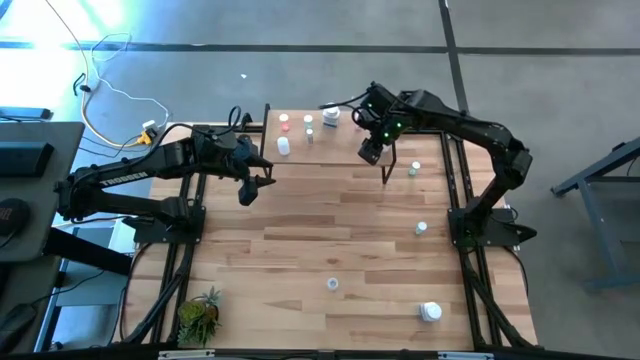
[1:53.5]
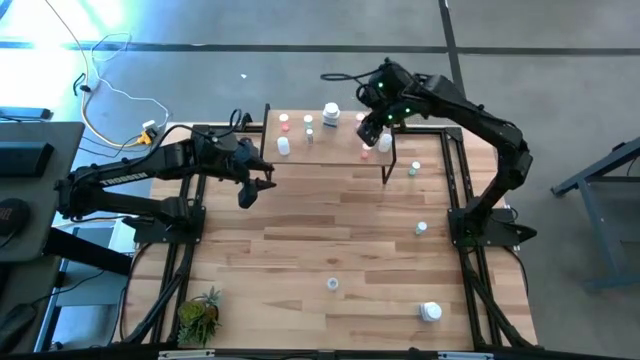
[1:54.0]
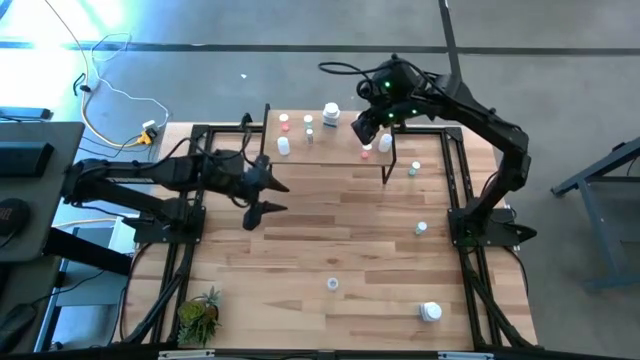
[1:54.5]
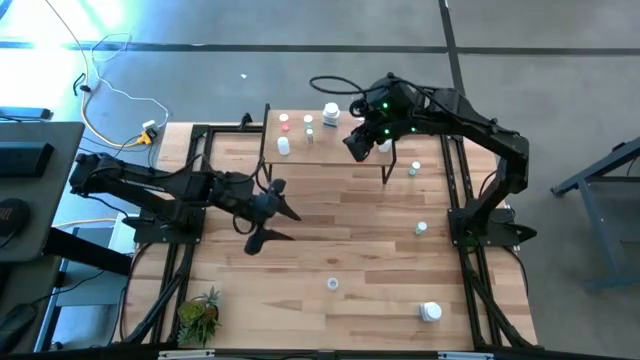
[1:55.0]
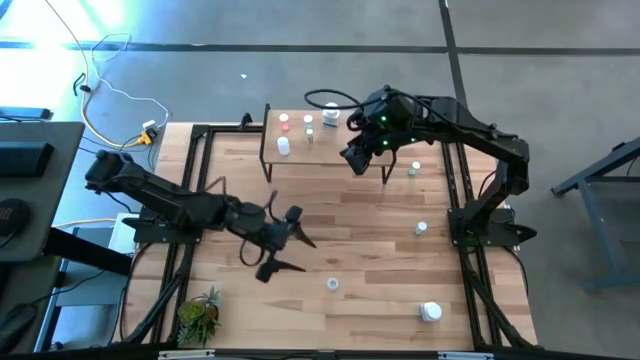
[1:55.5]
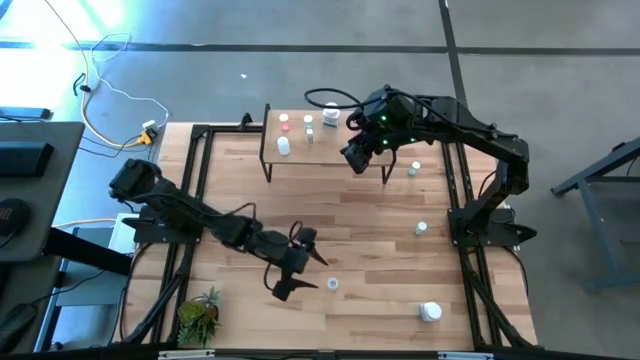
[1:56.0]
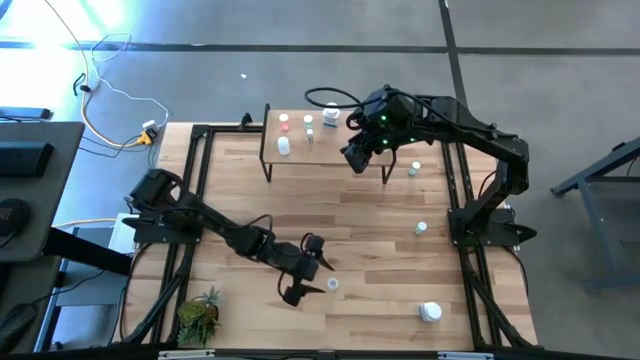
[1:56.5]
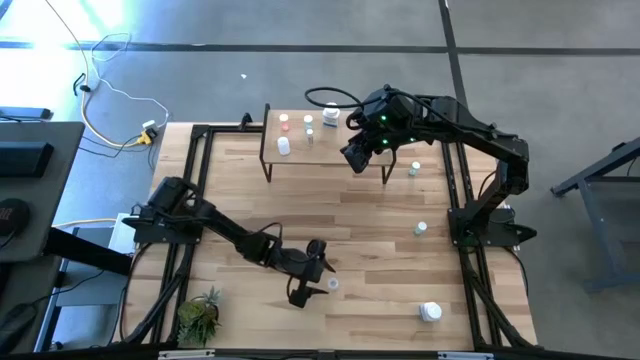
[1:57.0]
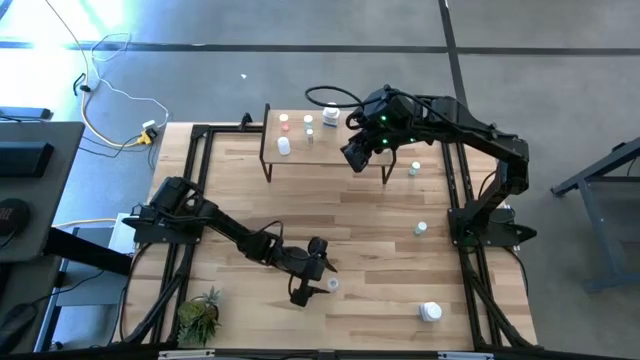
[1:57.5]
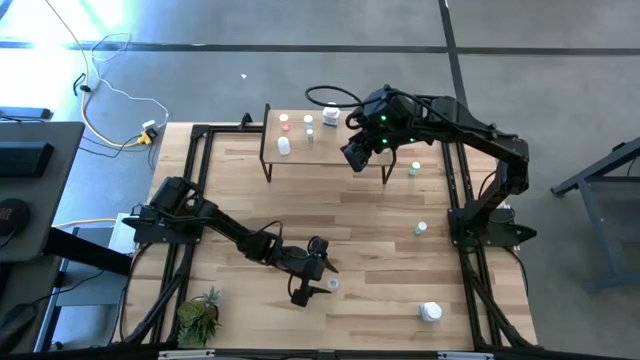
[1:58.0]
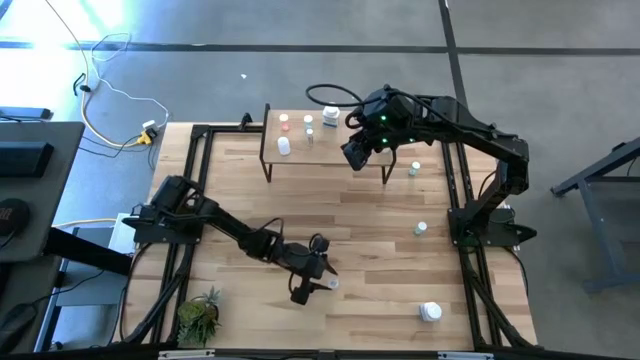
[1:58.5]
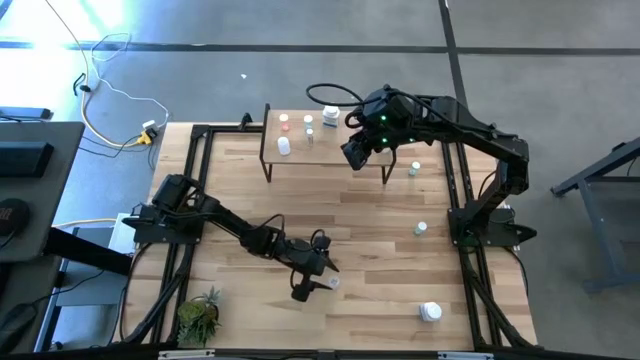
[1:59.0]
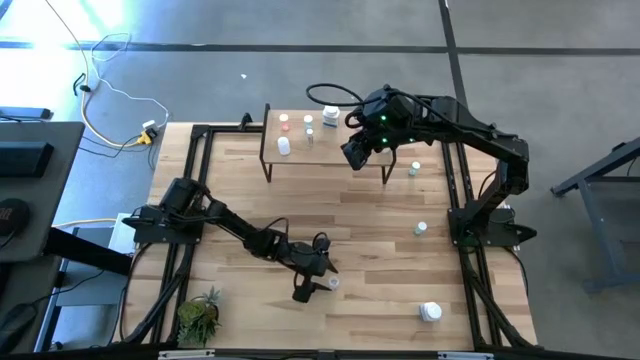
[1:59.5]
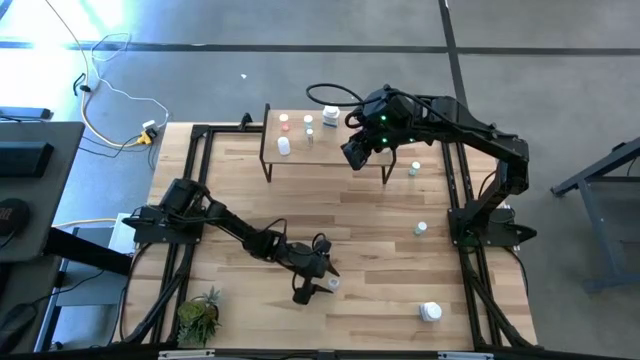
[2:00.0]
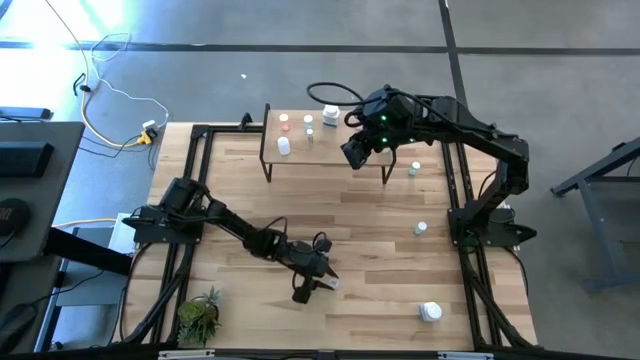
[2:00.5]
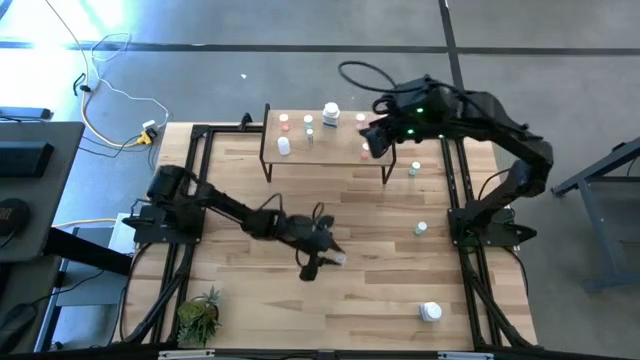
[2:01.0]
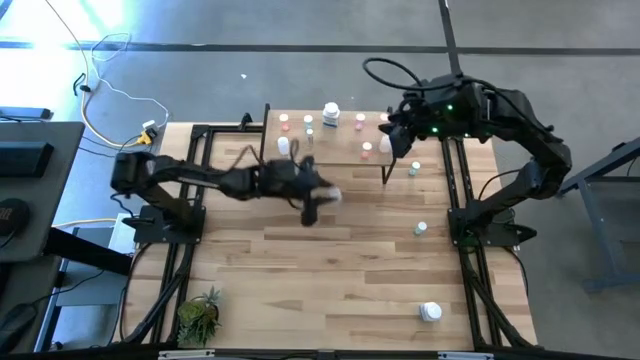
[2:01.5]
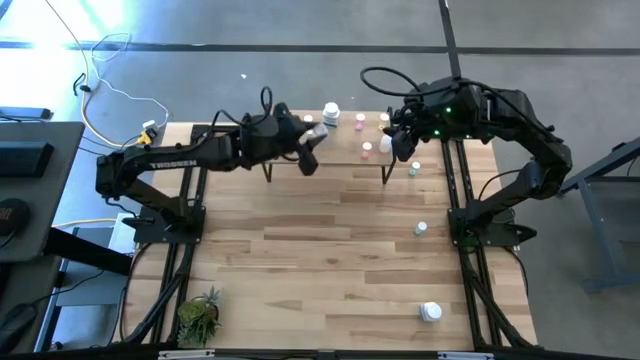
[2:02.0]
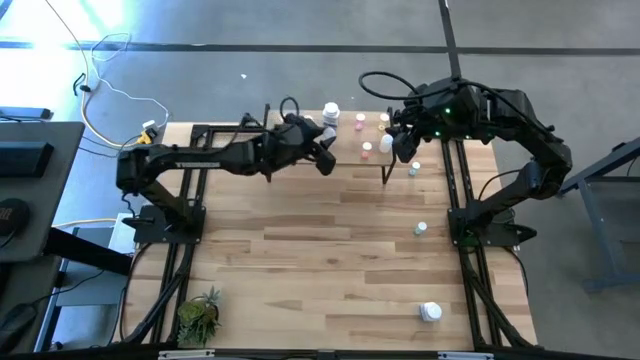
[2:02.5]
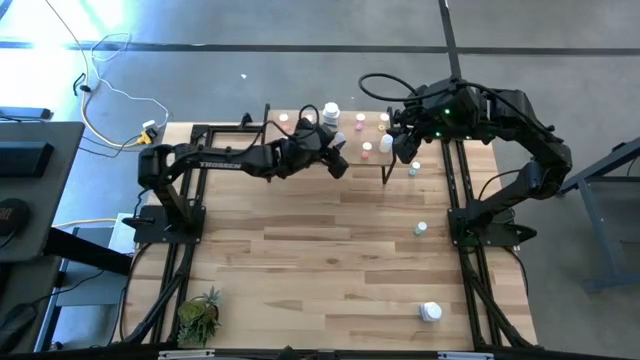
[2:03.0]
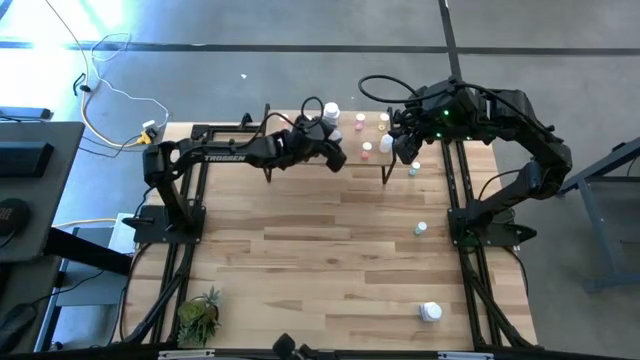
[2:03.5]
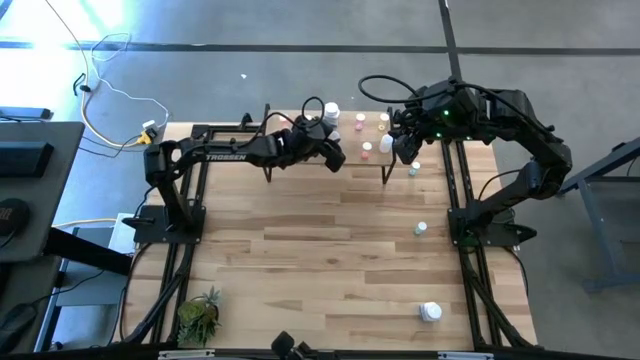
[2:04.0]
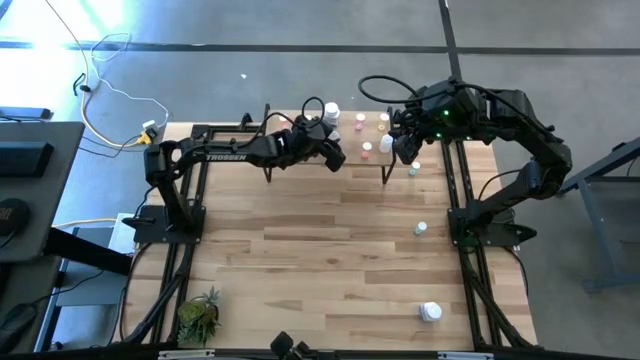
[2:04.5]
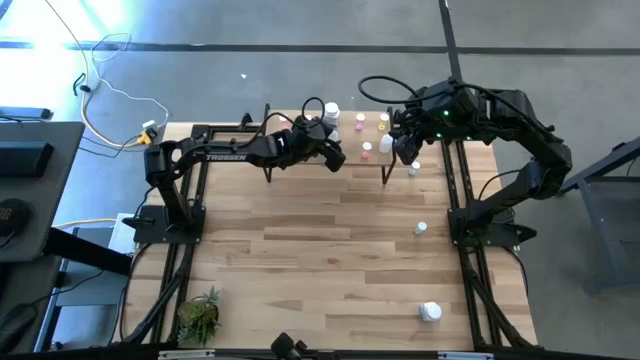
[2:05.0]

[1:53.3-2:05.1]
Task: Pick and place medicine bottles onto shelf by color
Put the white pill bottle on the shelf

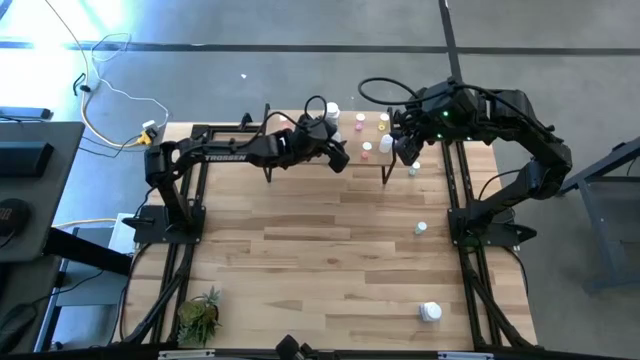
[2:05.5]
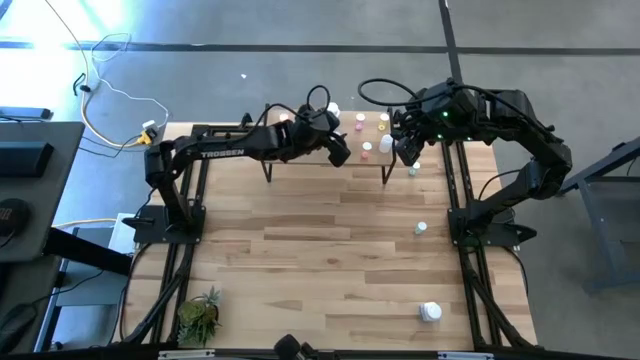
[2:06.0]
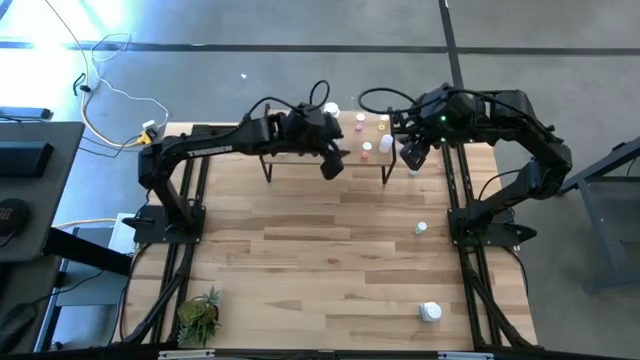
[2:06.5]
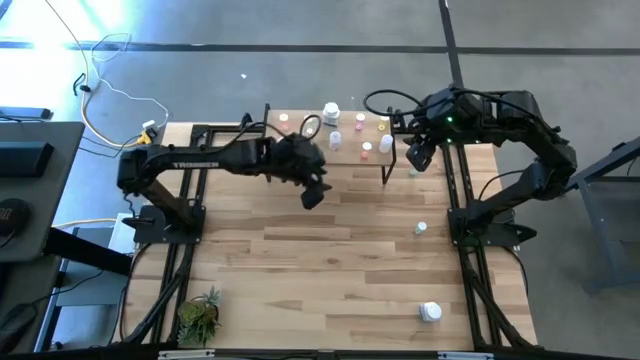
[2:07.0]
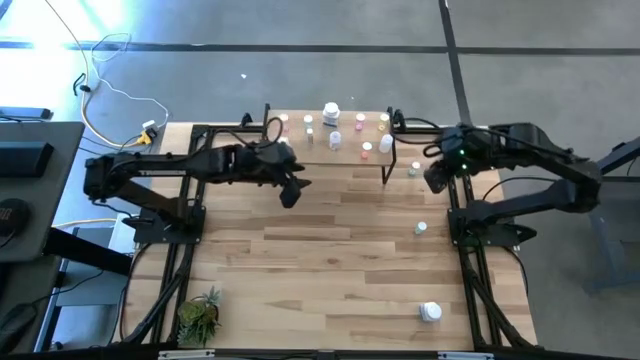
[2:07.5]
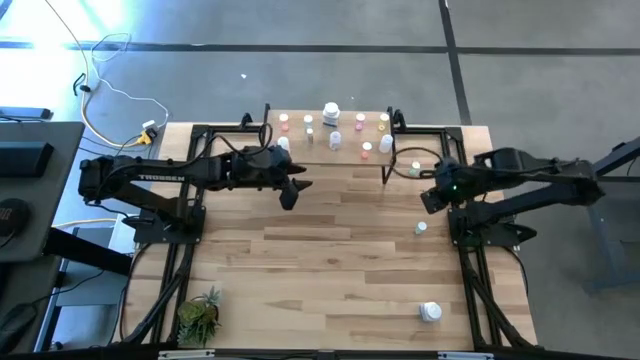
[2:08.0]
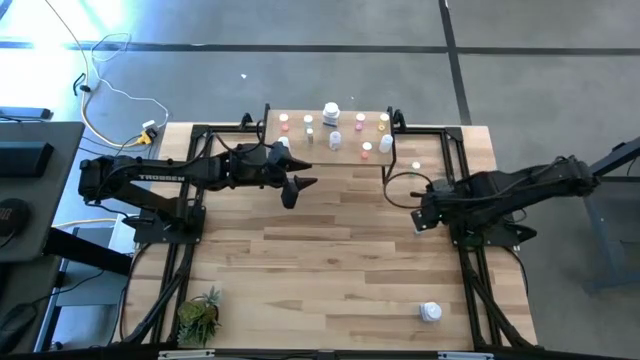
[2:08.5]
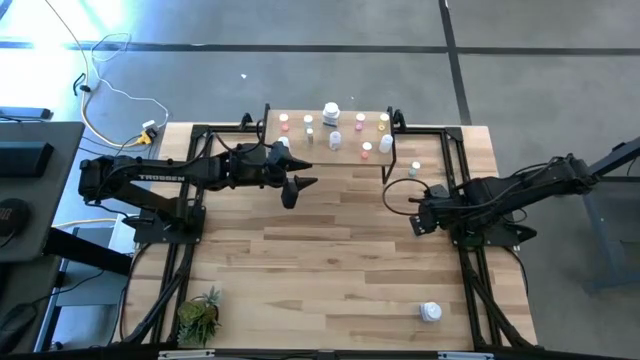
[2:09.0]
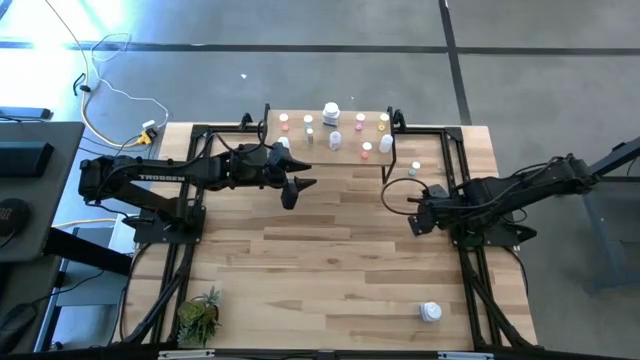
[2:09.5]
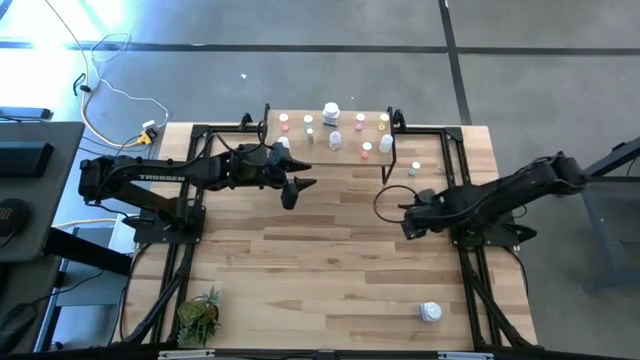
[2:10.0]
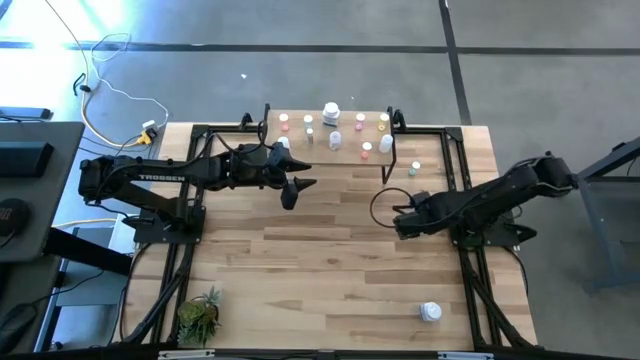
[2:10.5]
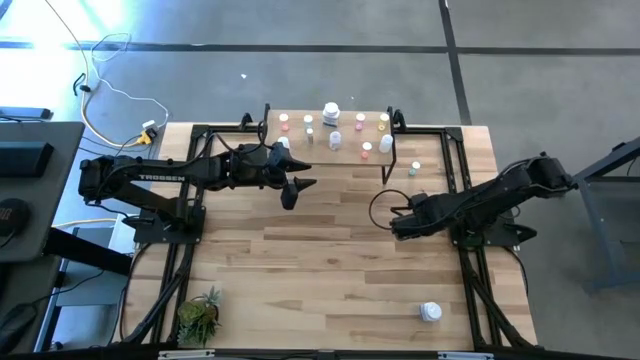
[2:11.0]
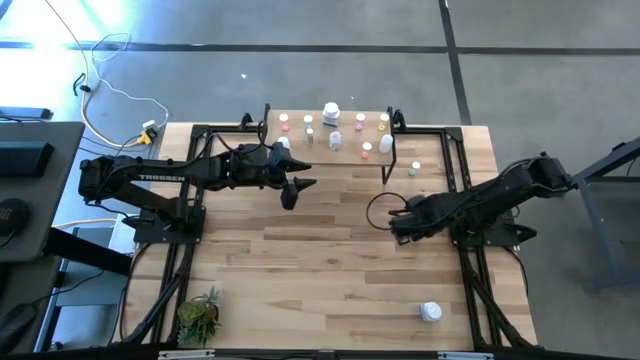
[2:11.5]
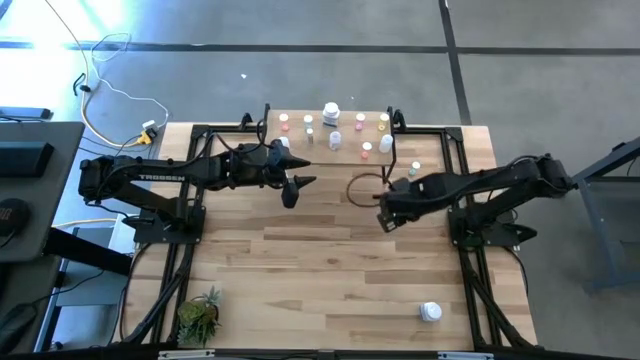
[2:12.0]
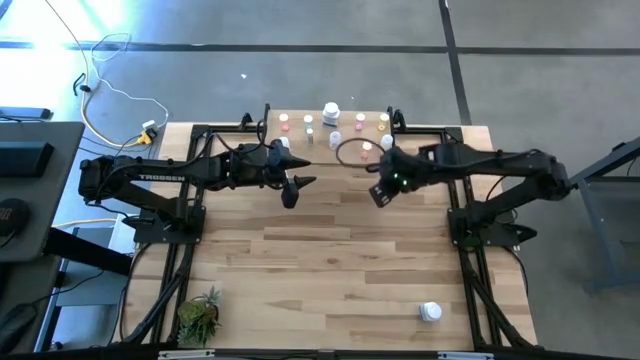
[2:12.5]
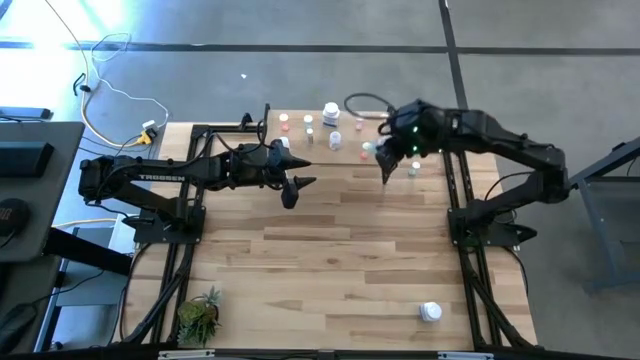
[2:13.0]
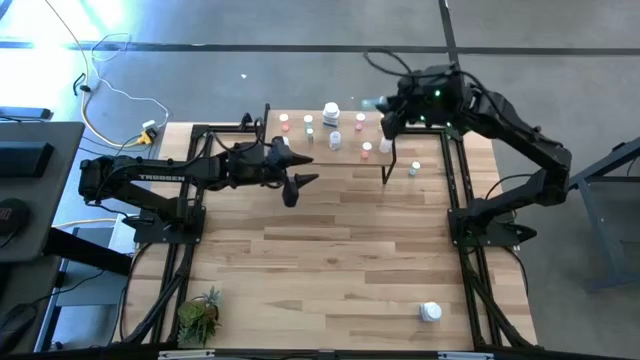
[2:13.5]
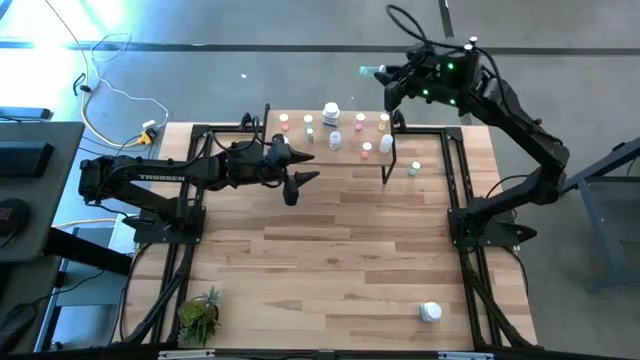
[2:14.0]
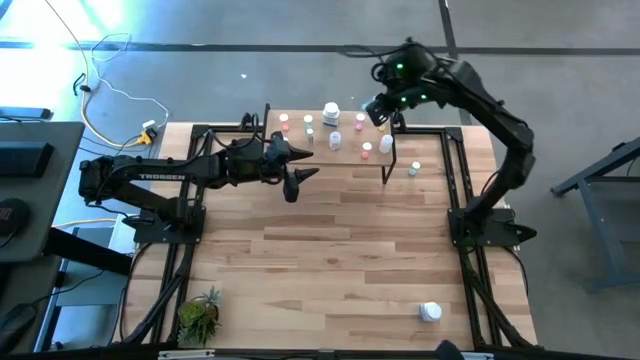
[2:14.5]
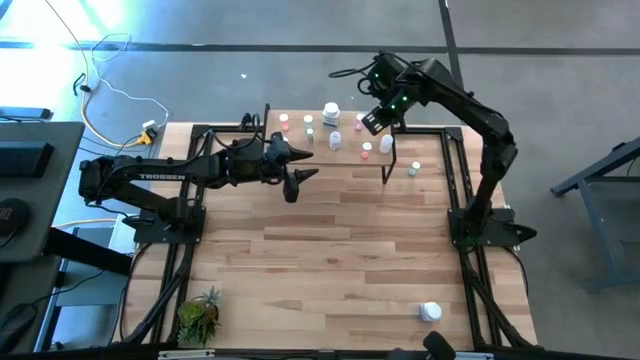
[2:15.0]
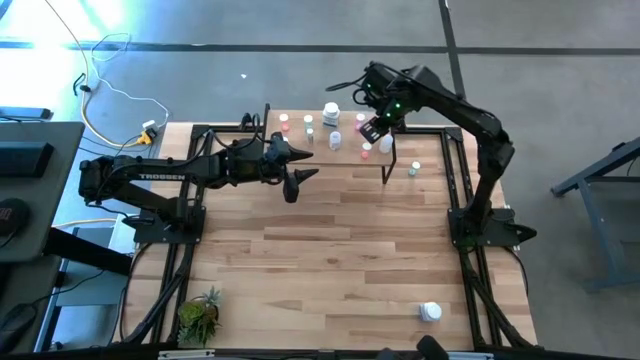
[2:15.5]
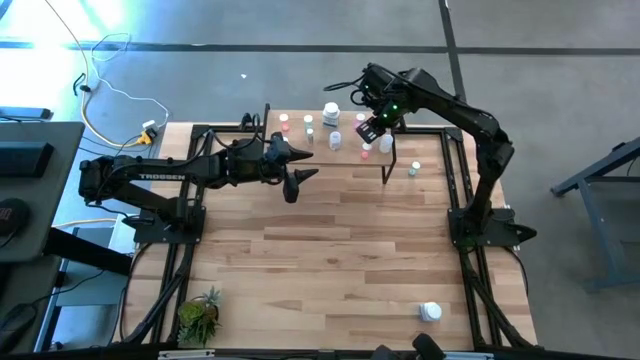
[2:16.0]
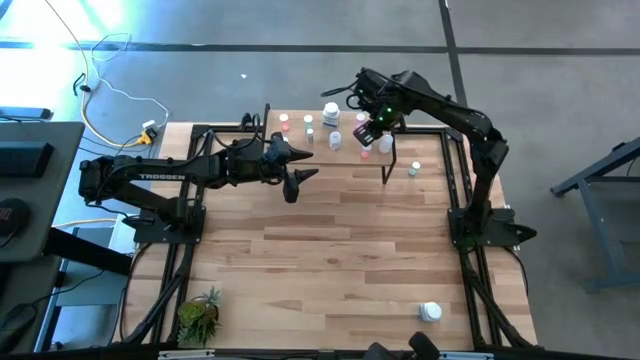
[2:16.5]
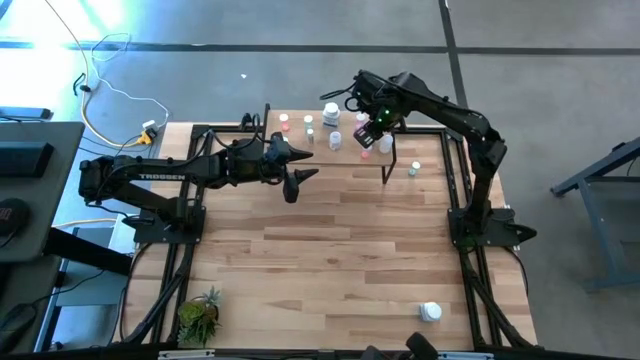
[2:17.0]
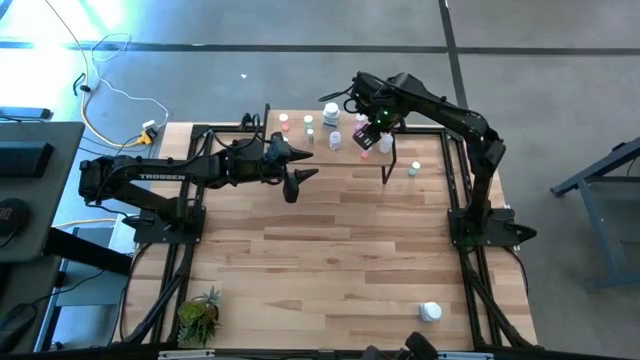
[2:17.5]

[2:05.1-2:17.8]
Put the blue pill bottle on the shelf
